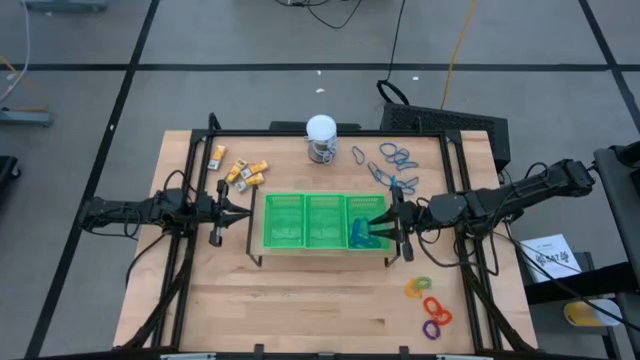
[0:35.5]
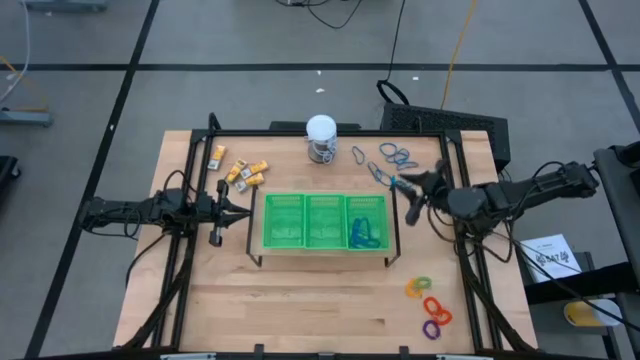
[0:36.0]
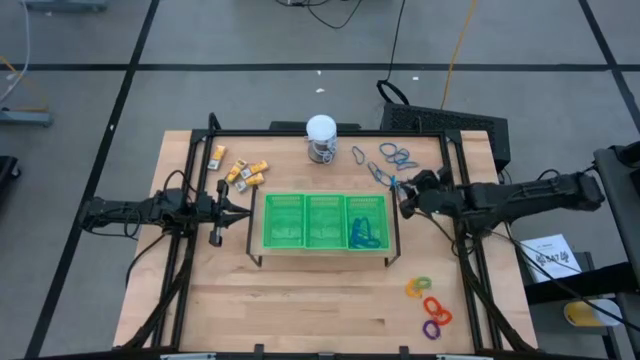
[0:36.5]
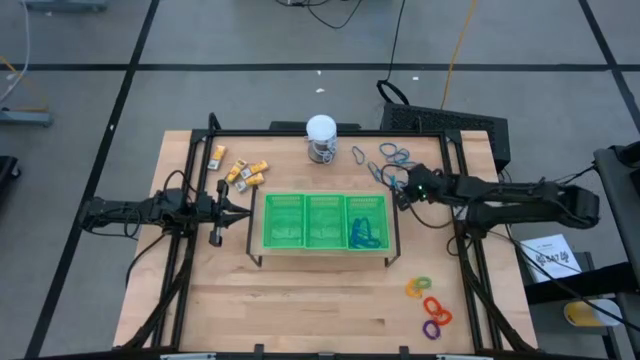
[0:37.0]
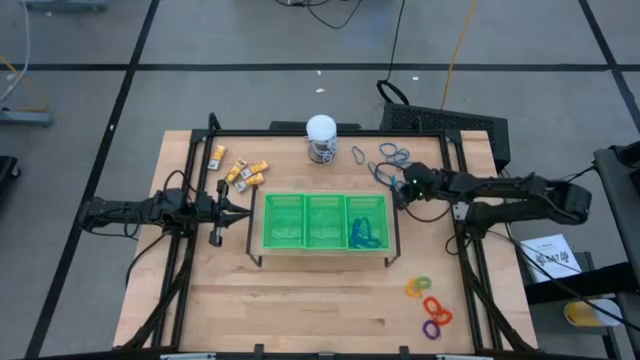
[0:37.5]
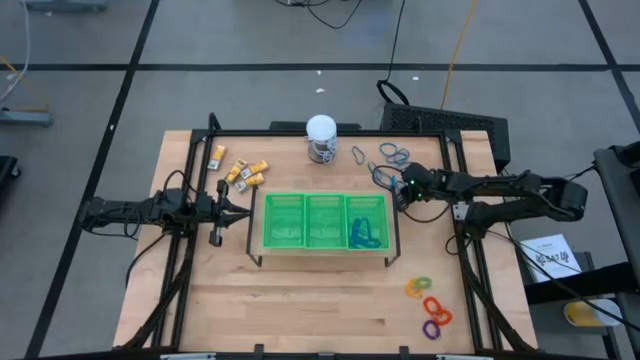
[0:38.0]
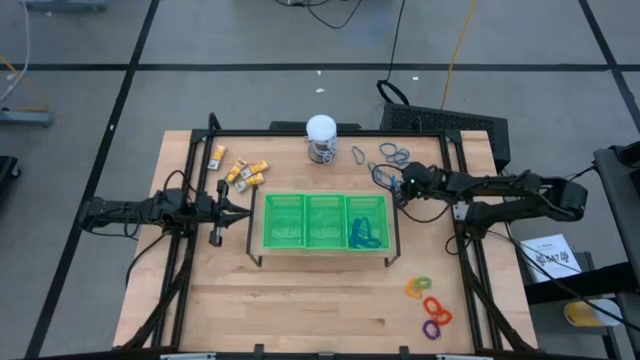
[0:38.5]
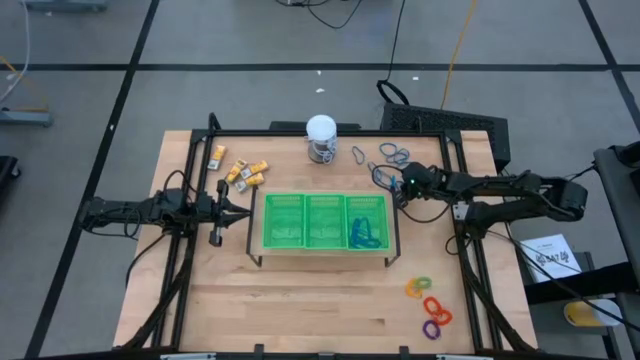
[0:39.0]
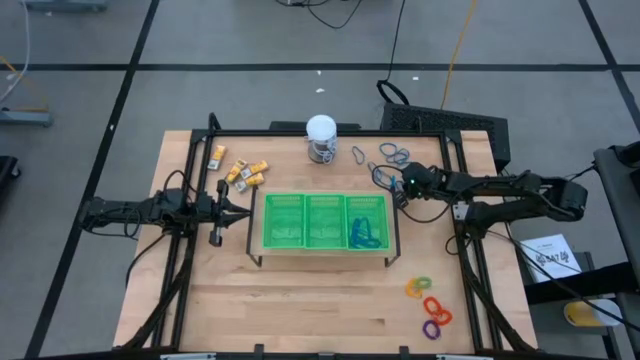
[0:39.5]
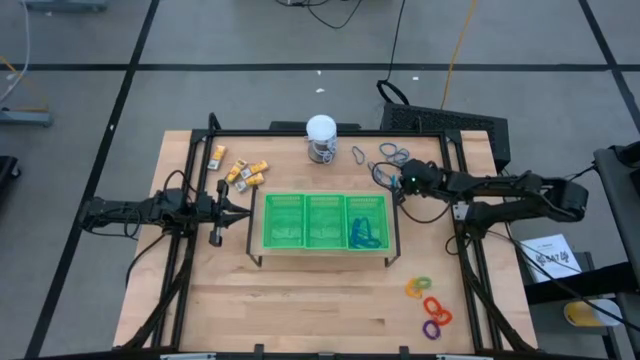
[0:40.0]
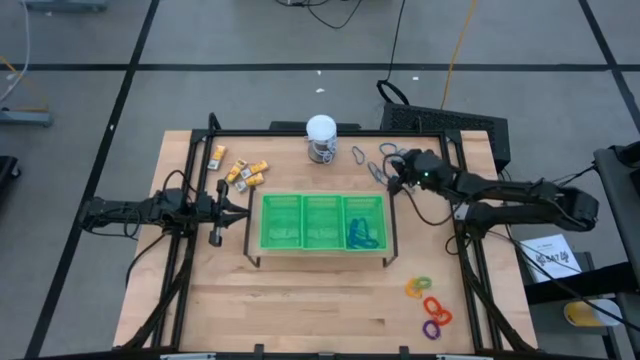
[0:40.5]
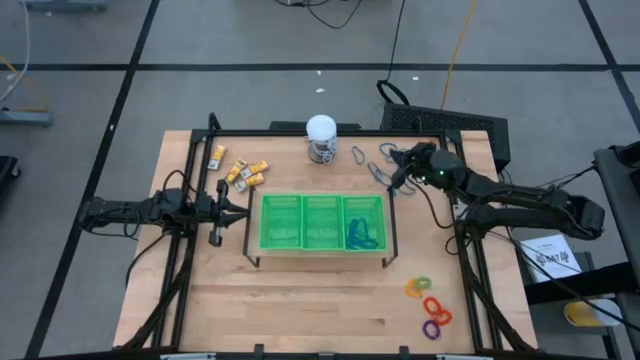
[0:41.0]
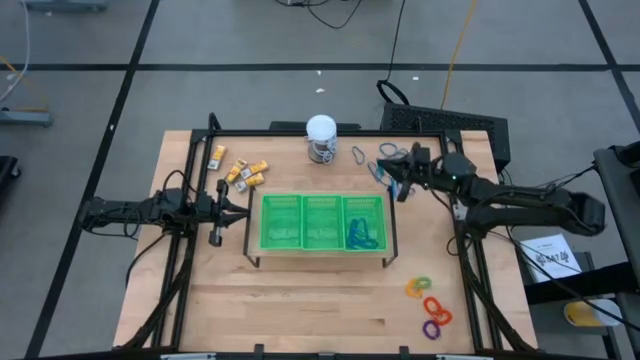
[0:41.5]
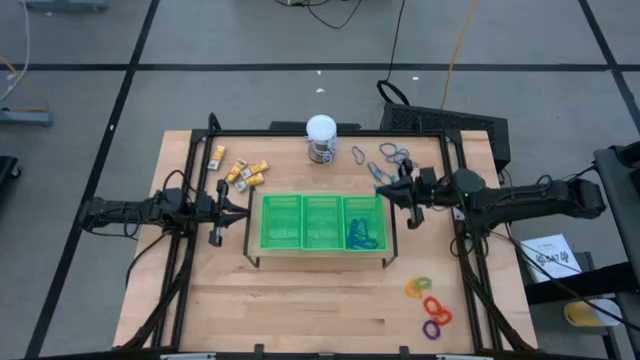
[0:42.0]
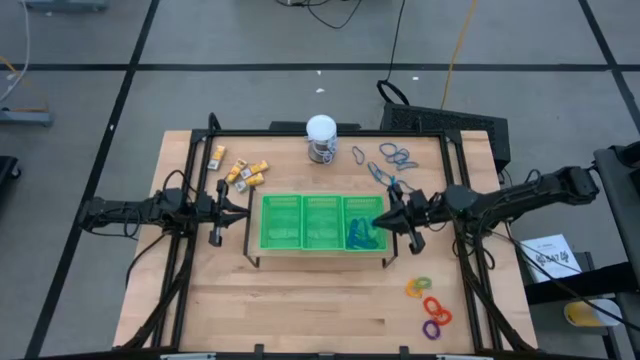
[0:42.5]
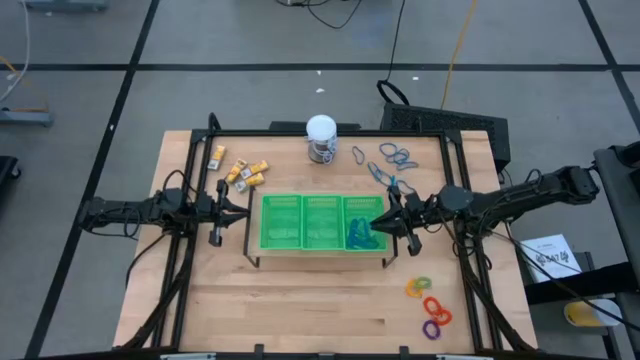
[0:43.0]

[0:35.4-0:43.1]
Task: Pick & Place Office Desk Supplies
Put the blue rubber band into the right green bin on the shelf

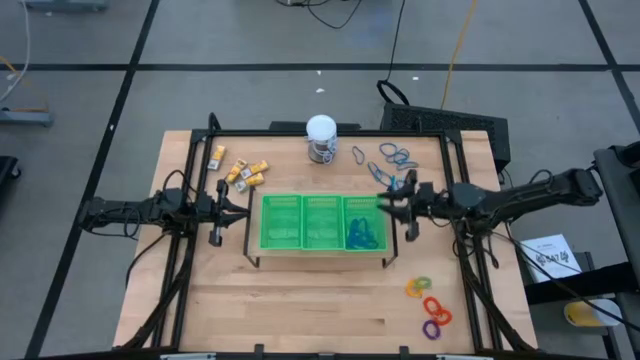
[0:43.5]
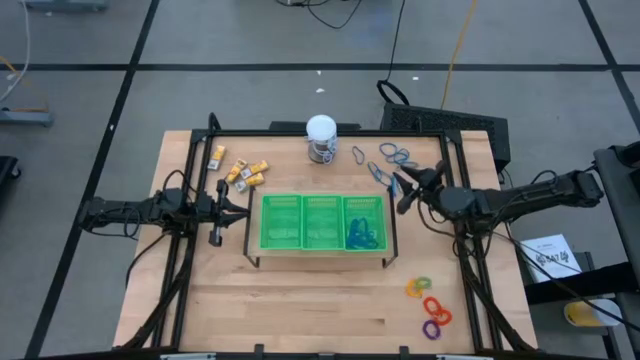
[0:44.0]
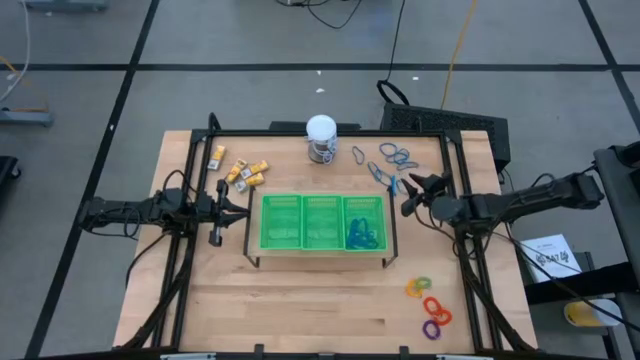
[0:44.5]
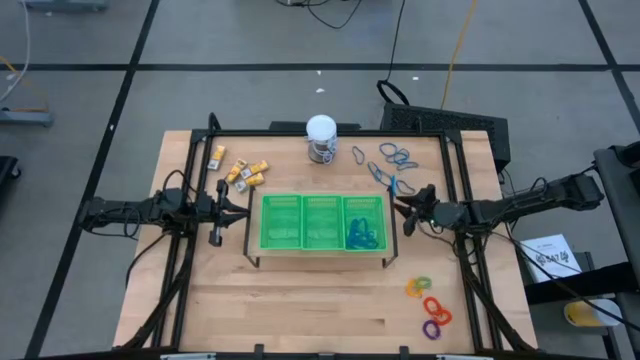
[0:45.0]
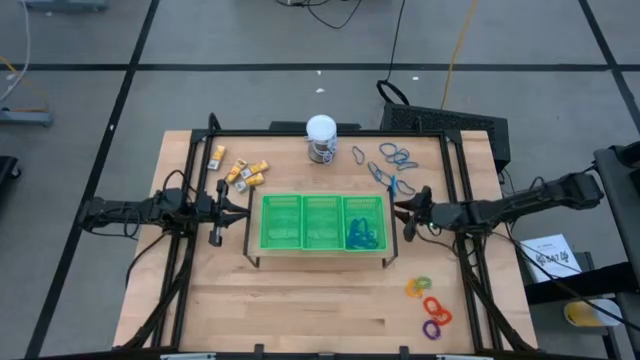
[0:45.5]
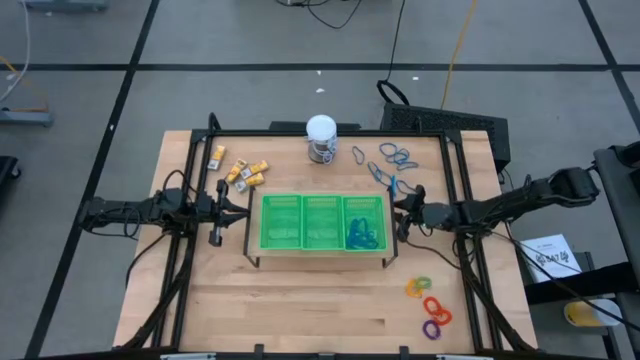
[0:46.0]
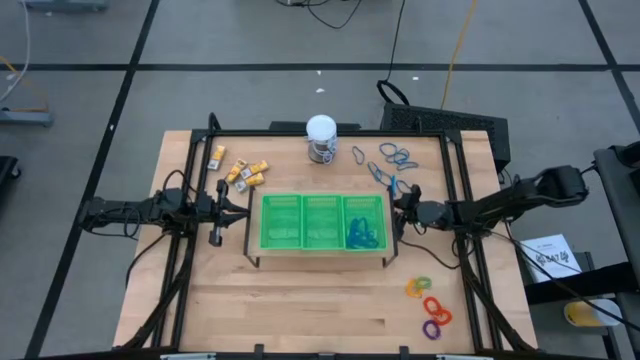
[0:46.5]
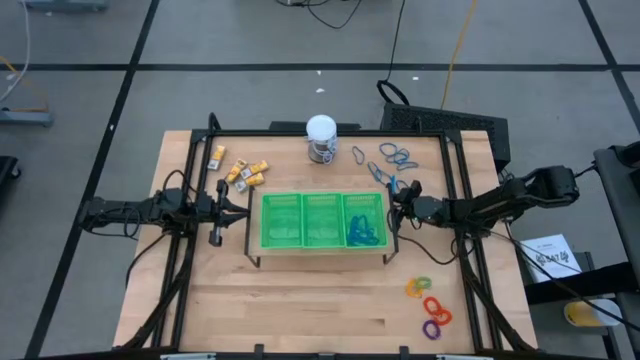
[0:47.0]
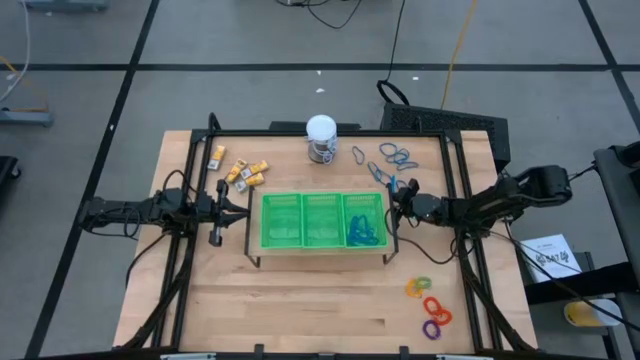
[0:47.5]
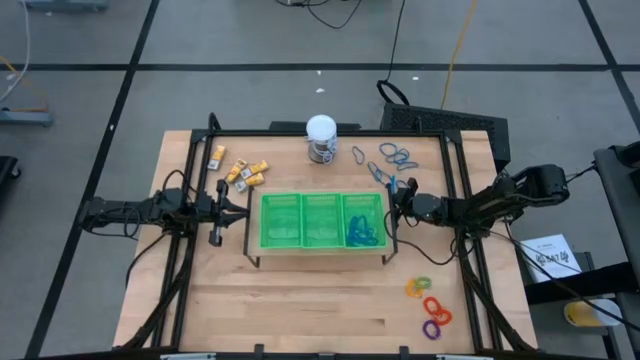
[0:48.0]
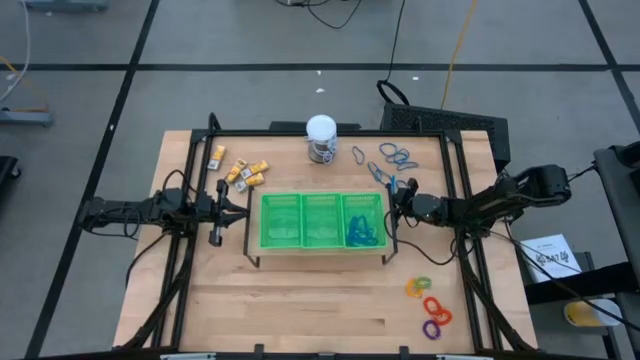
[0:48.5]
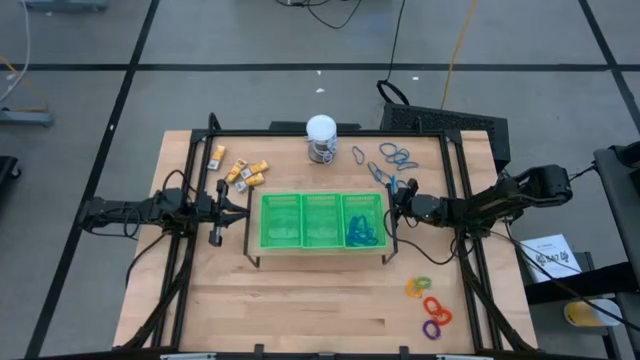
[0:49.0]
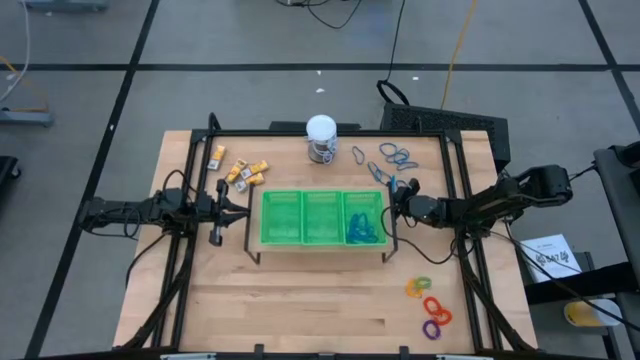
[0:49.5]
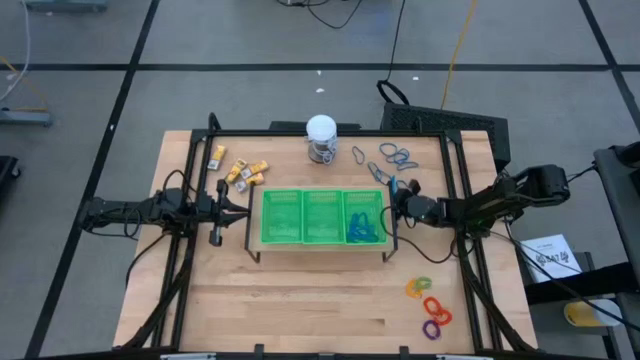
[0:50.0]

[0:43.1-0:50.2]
Adjust the shelf on the table

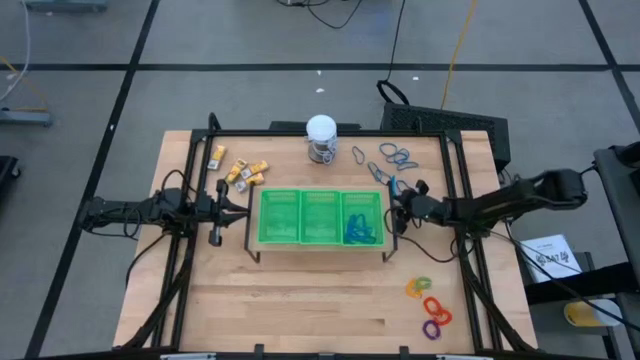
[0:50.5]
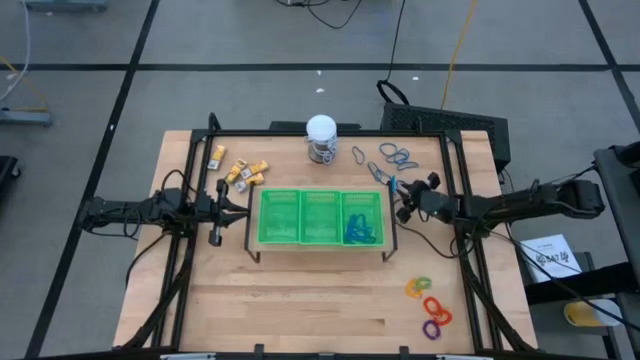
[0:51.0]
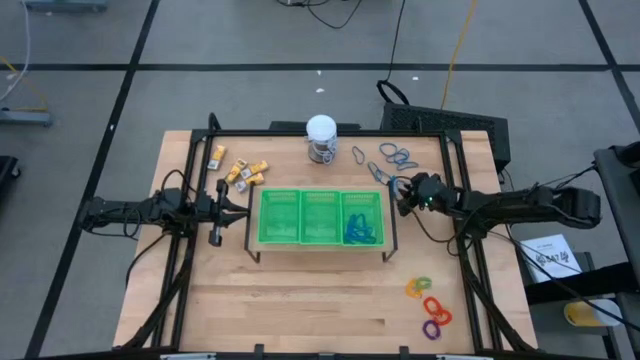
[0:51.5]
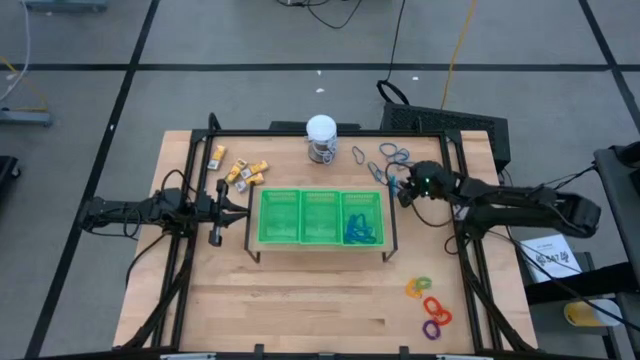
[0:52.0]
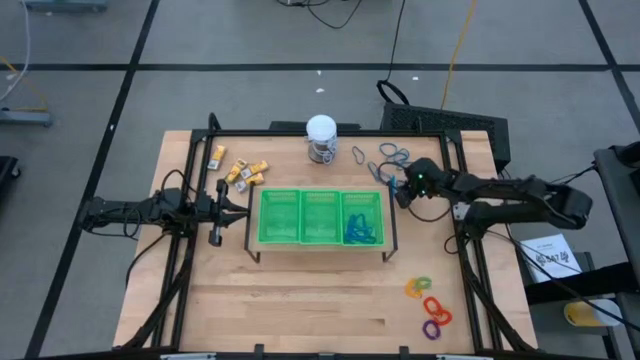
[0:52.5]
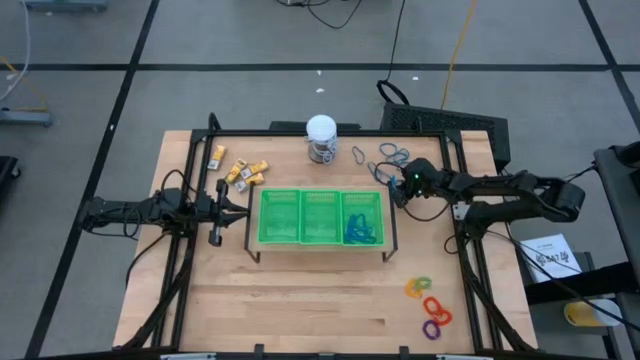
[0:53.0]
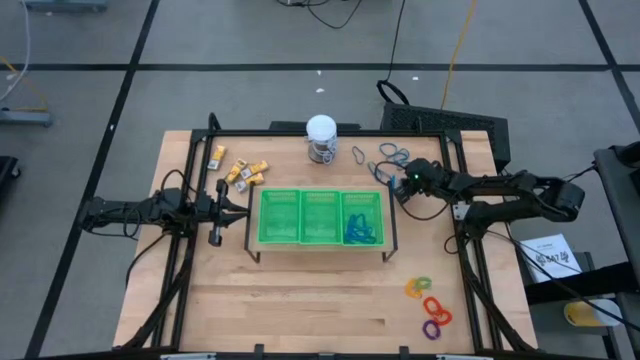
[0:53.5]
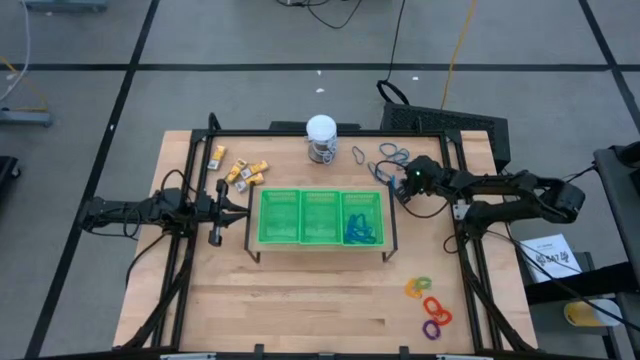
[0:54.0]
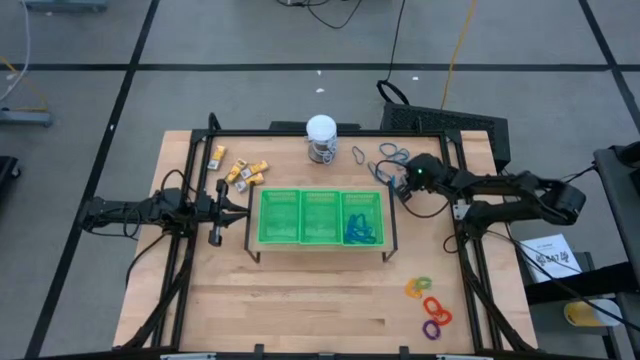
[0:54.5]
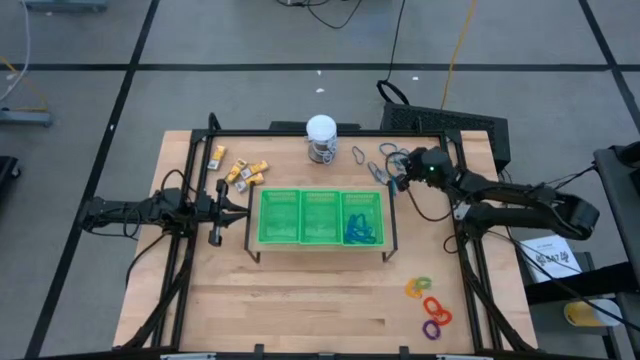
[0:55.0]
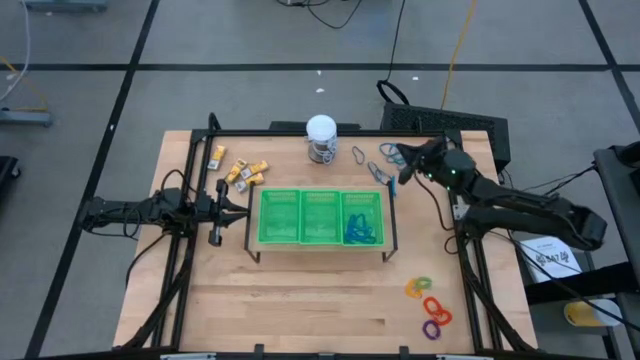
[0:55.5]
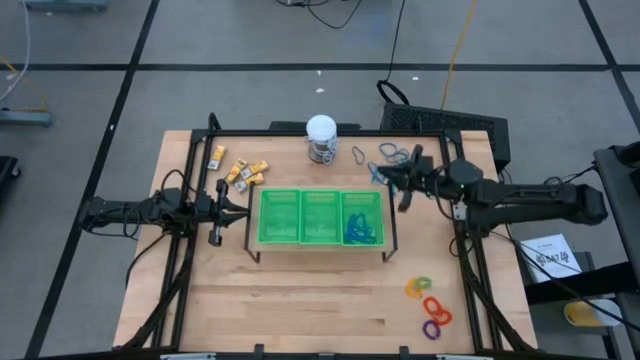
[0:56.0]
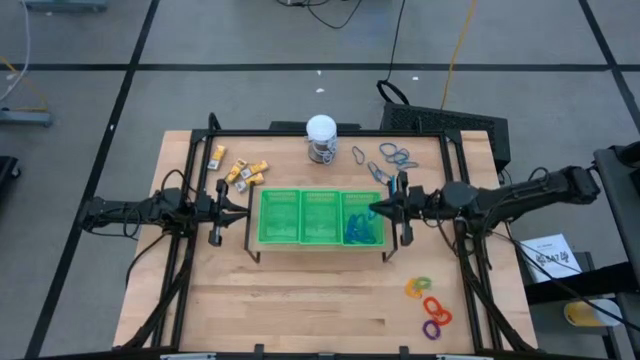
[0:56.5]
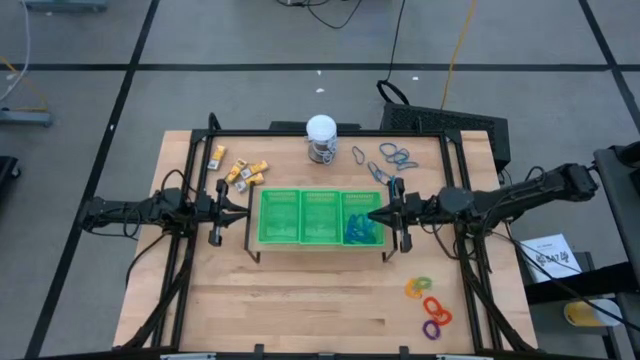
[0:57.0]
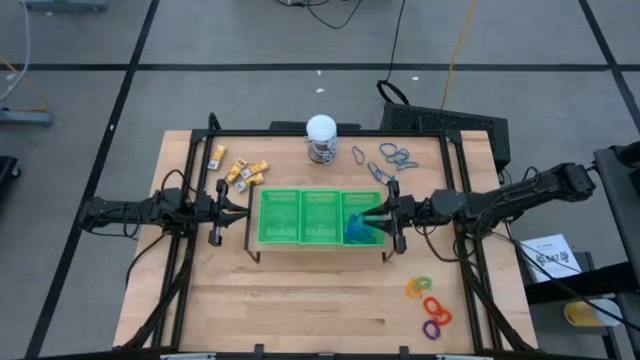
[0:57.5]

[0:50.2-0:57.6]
Put the blue rubber band into the right green bin on the shelf
